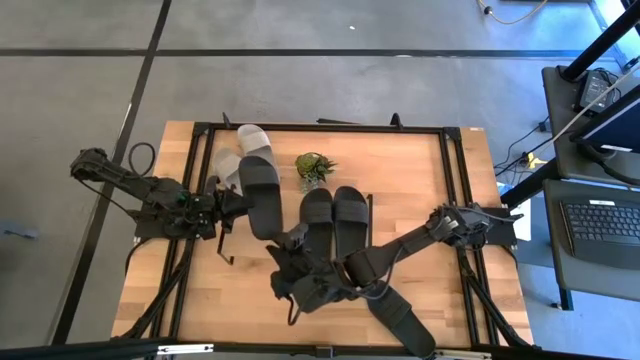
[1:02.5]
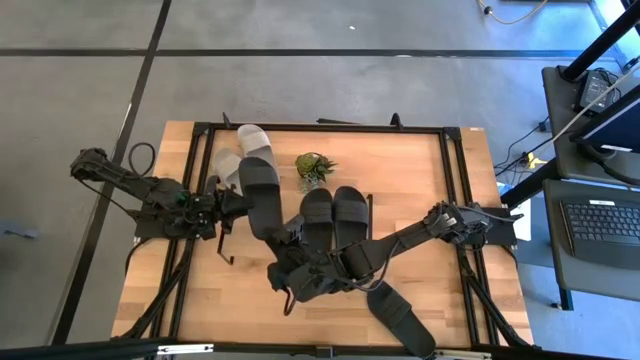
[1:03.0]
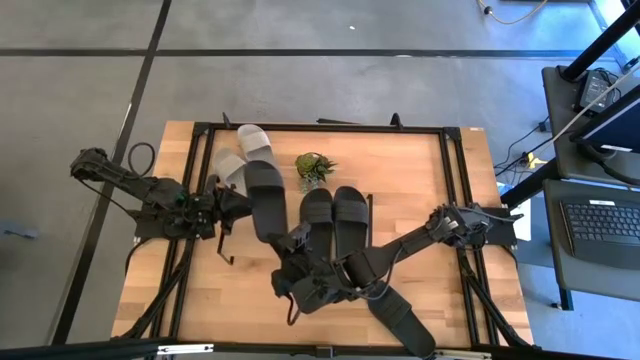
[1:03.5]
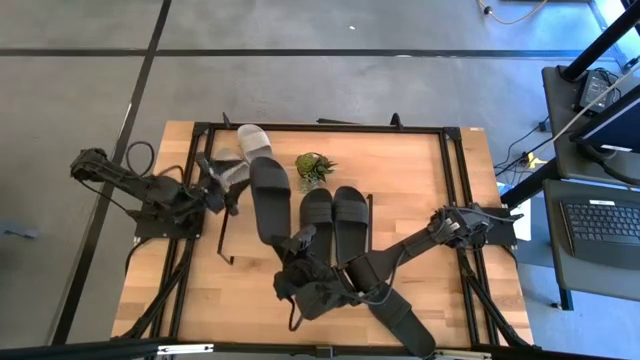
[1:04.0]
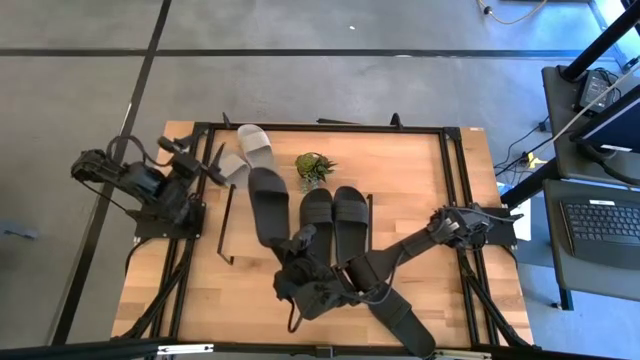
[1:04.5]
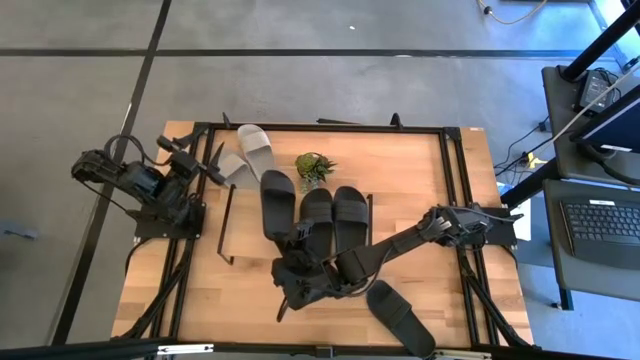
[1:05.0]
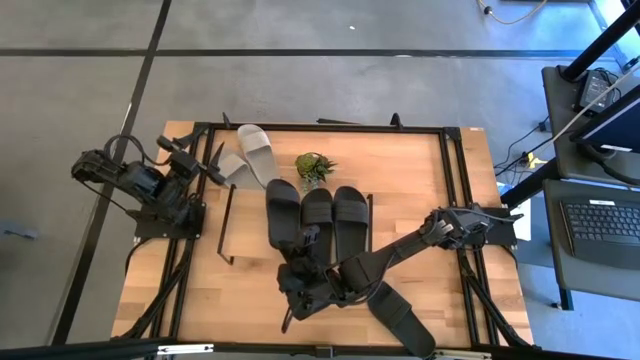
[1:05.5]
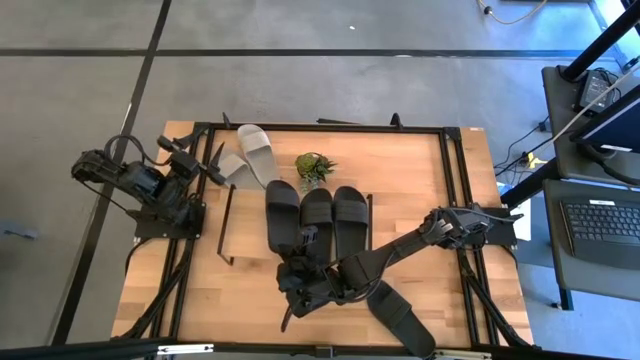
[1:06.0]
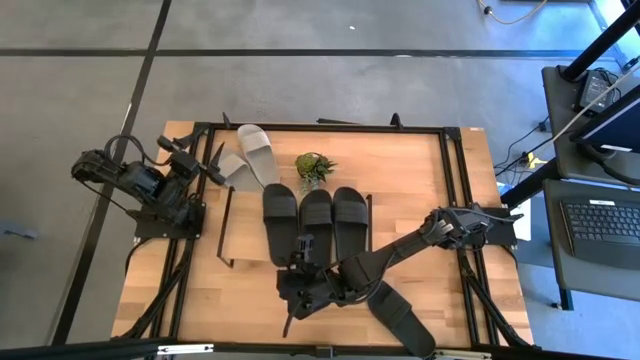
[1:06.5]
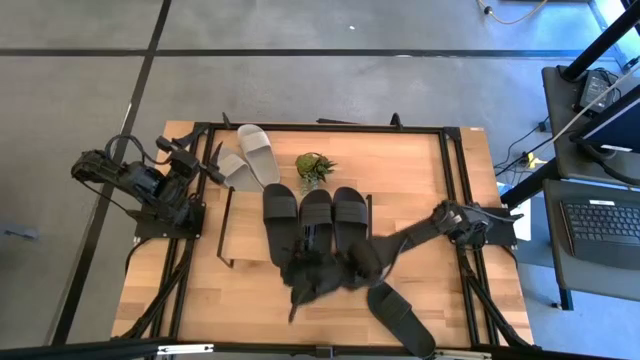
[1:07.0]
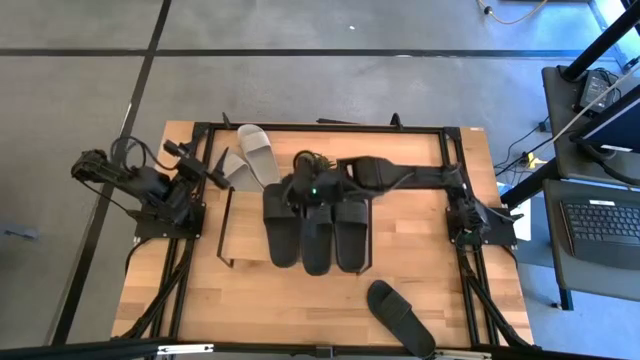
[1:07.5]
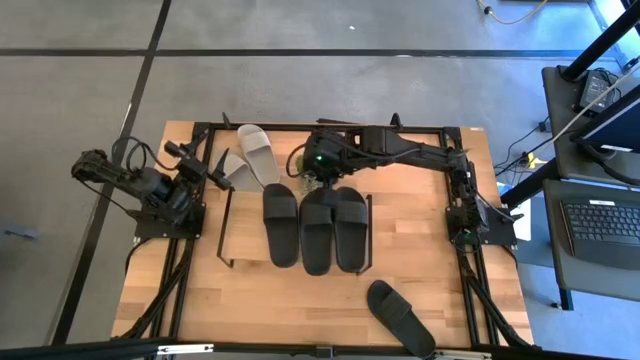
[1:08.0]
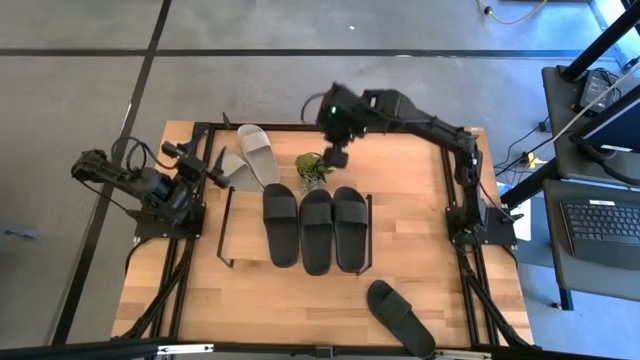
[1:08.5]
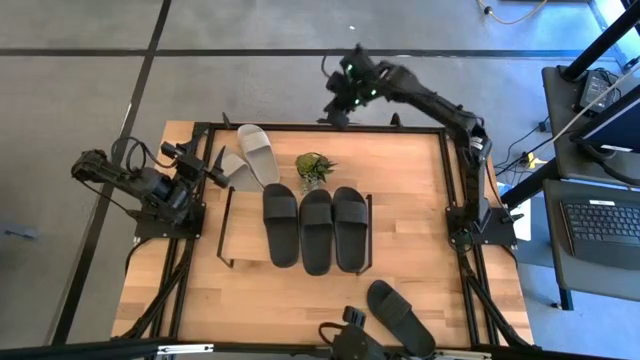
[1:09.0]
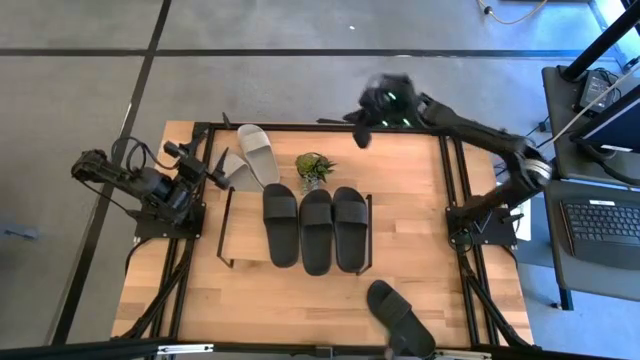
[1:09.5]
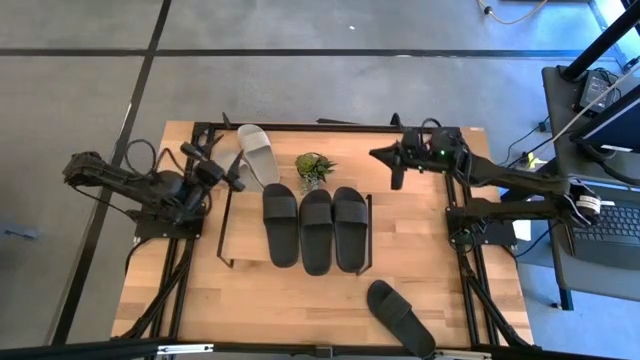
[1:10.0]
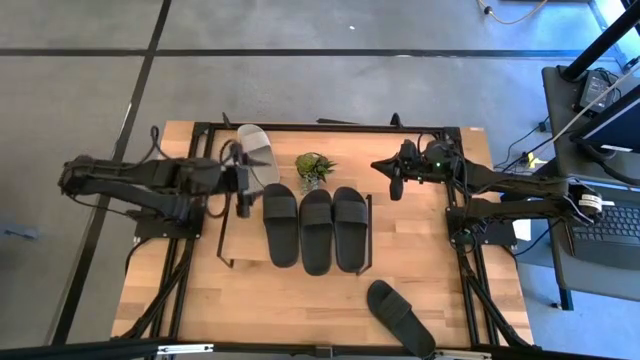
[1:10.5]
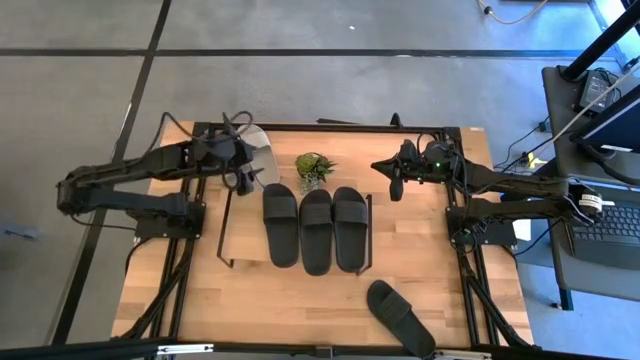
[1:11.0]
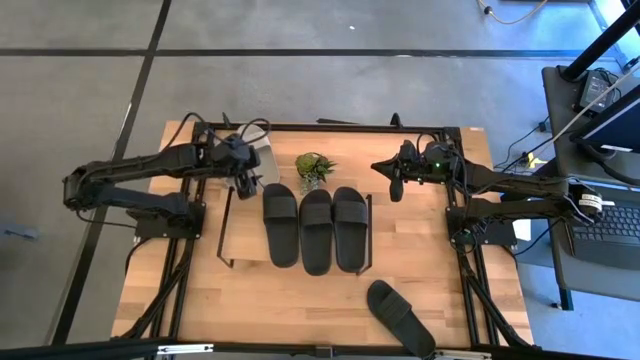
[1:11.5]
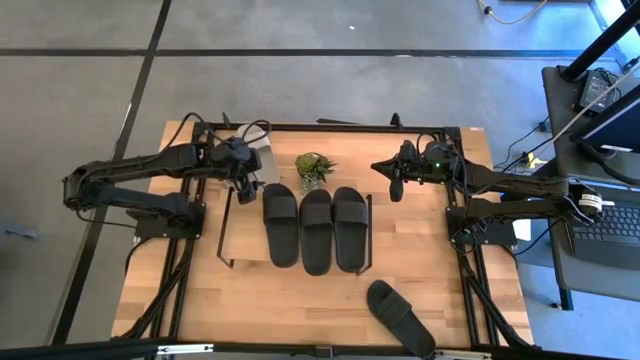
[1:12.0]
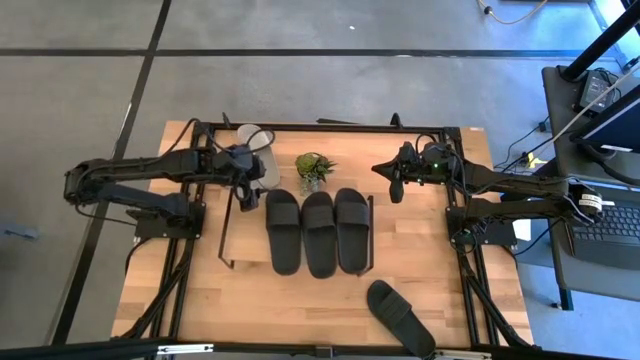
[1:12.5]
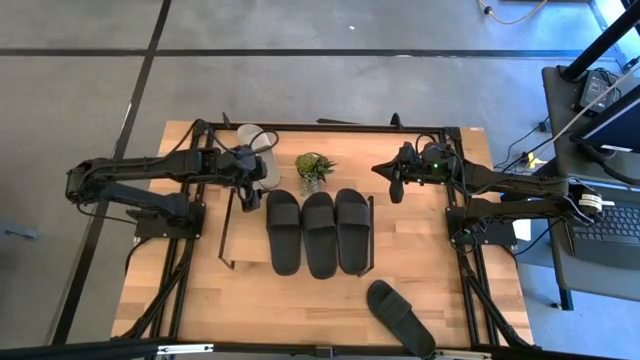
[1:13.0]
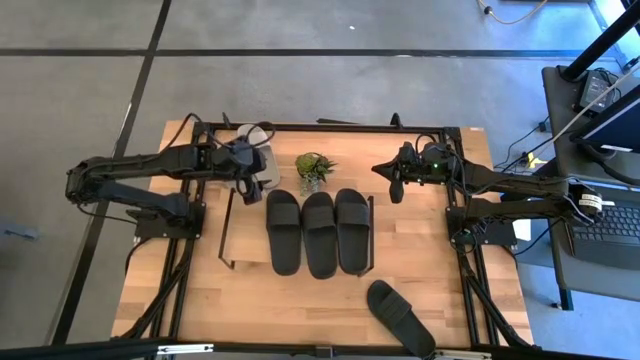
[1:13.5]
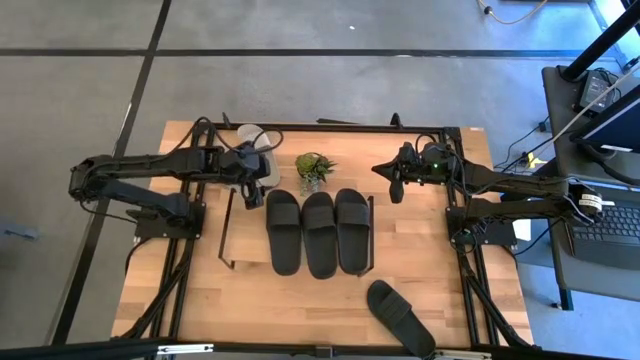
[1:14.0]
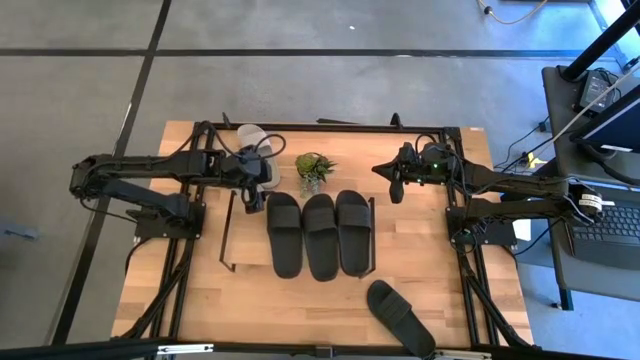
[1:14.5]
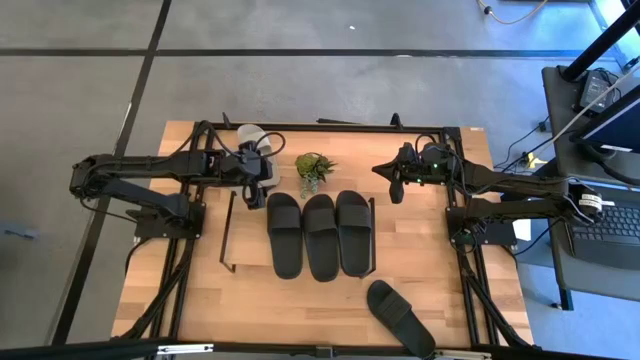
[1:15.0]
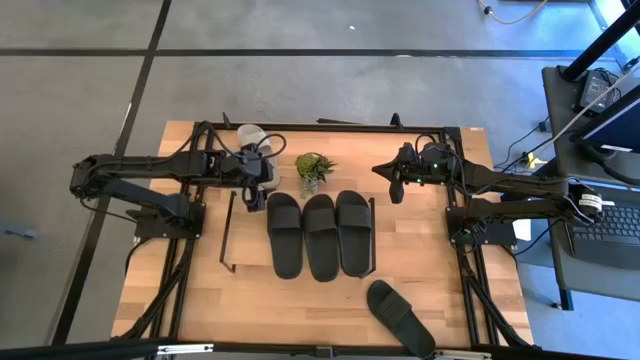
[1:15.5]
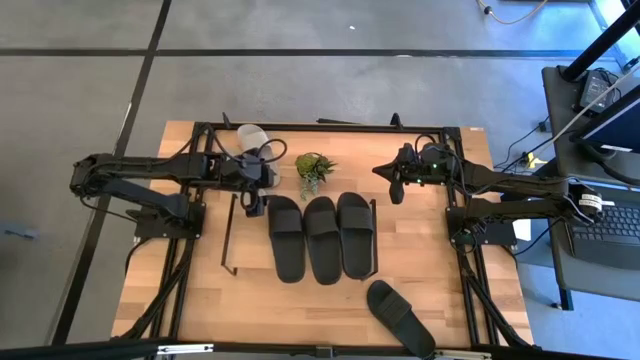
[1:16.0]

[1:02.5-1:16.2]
Task: Pick and place slides into the shelf
Put the black slide on the shelf

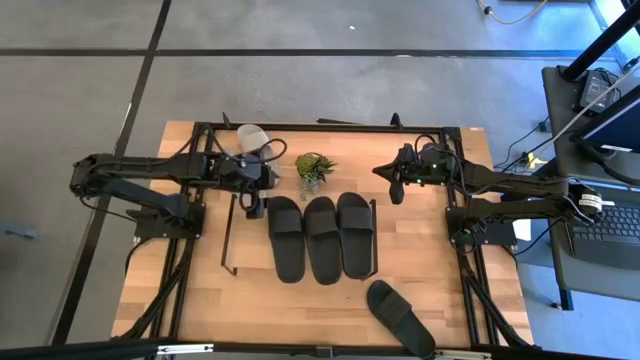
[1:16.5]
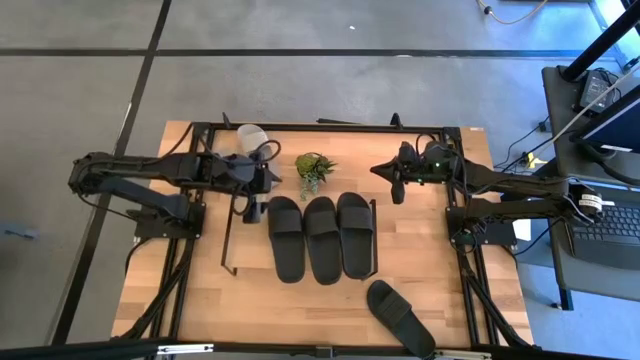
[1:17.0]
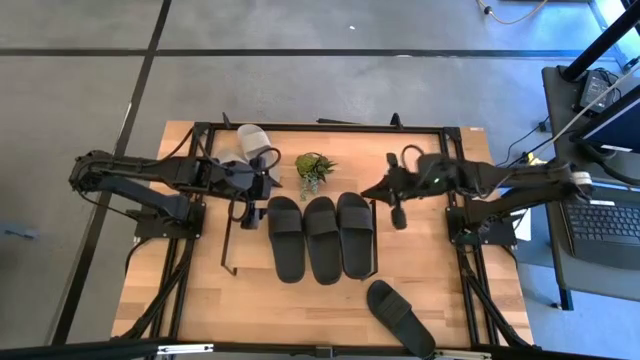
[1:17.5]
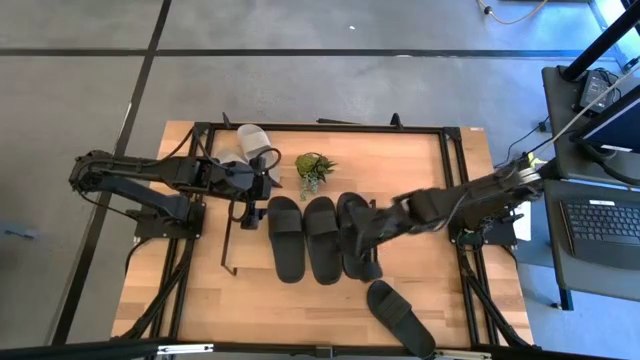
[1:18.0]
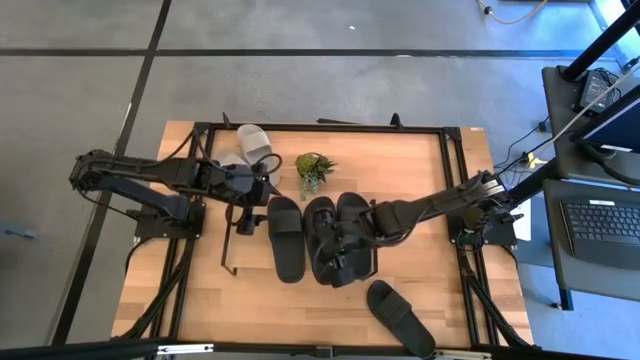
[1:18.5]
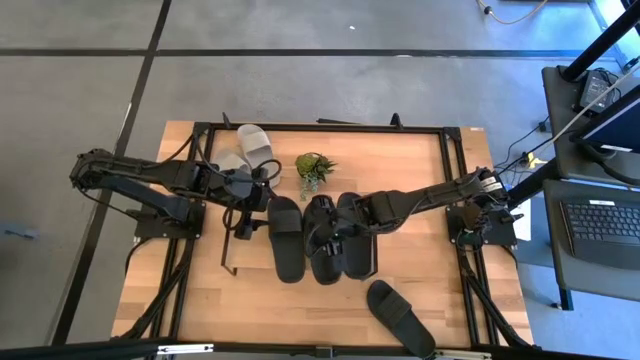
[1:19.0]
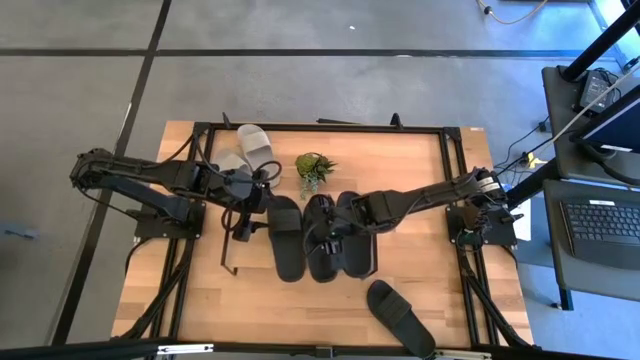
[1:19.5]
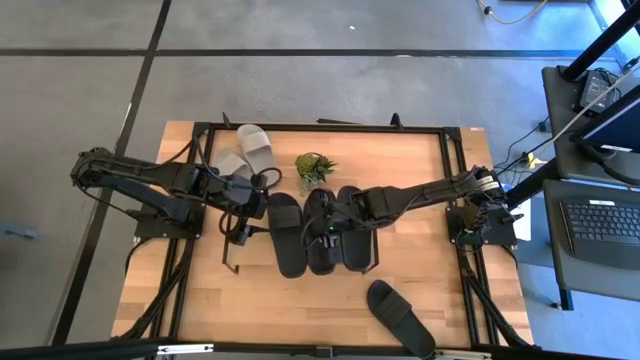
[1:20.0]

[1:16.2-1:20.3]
Adjust the black slide on the shelf

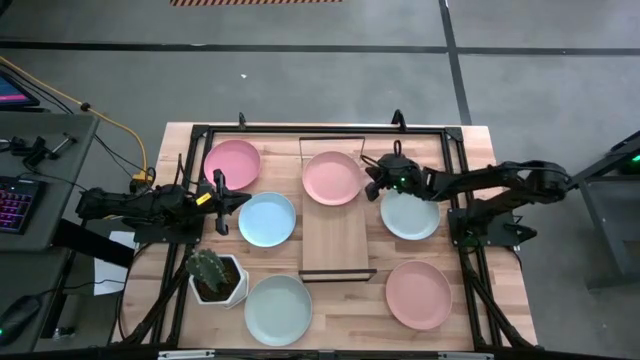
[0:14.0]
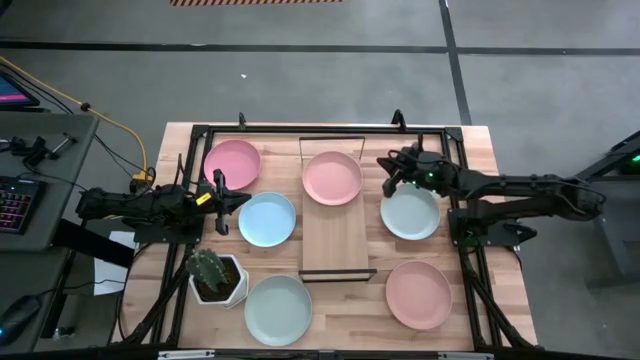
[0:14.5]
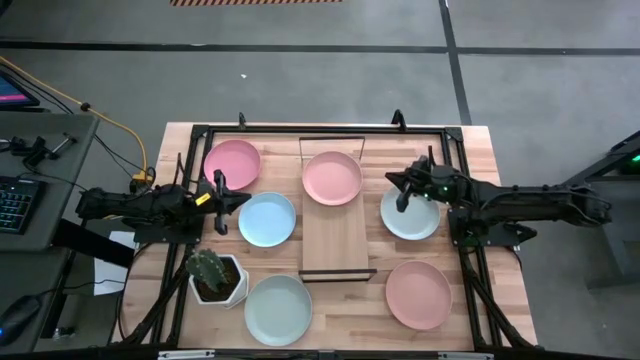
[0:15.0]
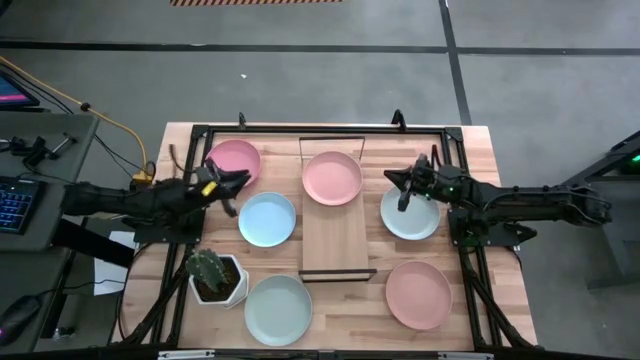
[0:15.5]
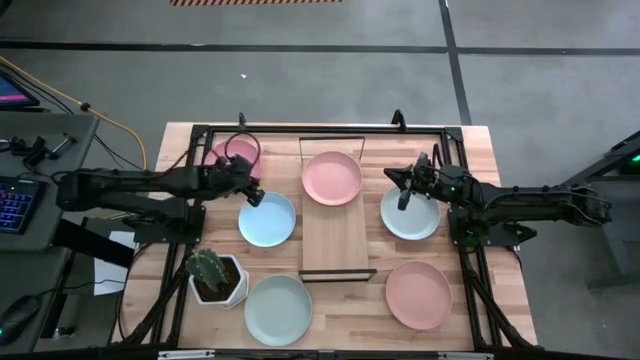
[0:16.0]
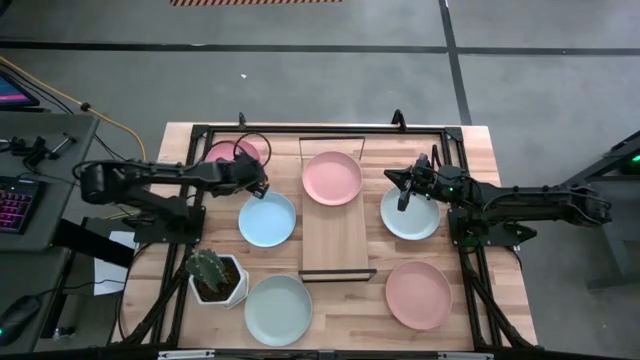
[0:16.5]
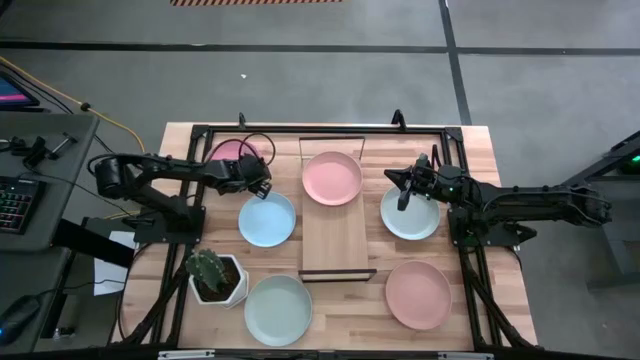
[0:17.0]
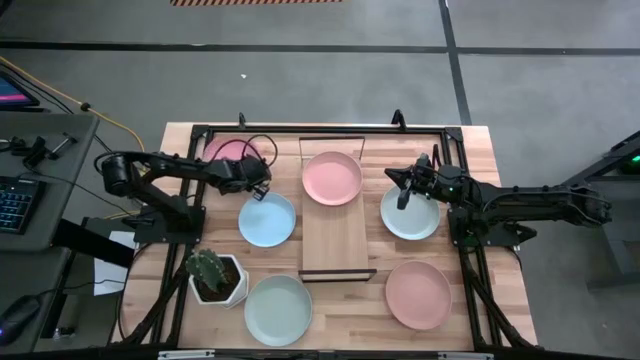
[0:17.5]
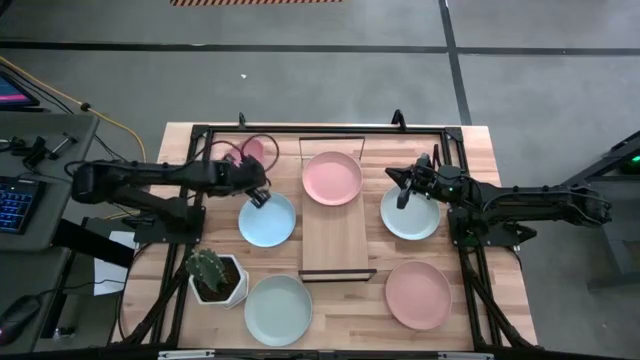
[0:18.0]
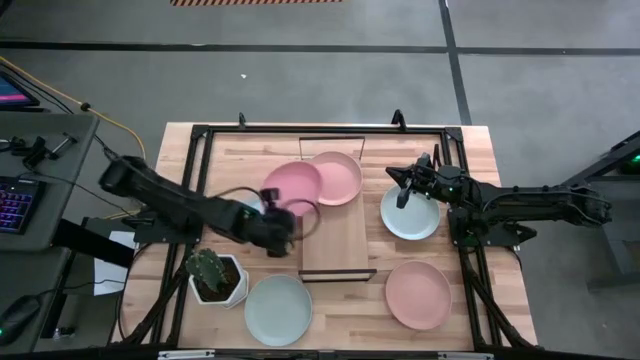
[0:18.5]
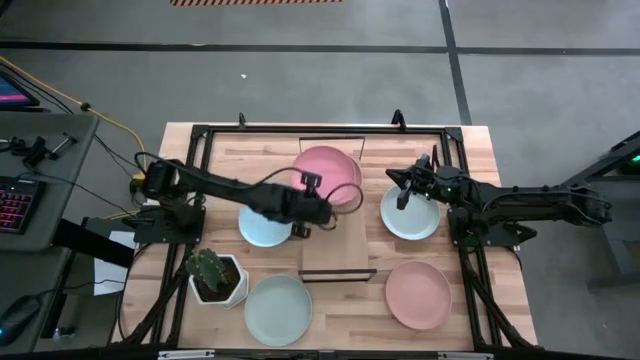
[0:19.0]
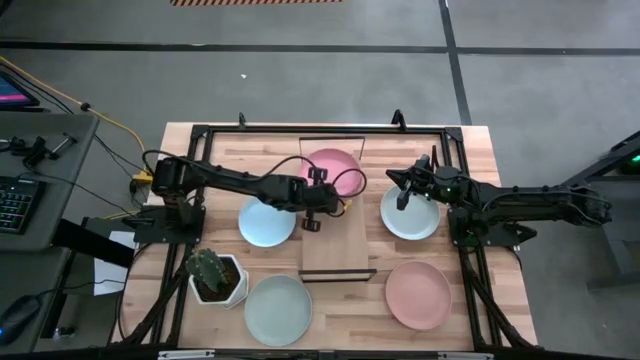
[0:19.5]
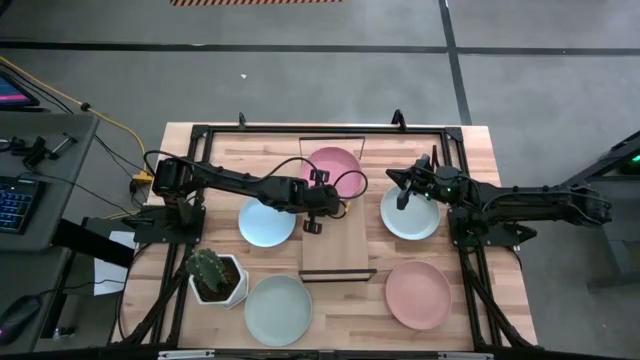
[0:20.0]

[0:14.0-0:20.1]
Task: Place and stack plates onto a shelf
Stack the pink plate on top of the light pink plate on the shelf
